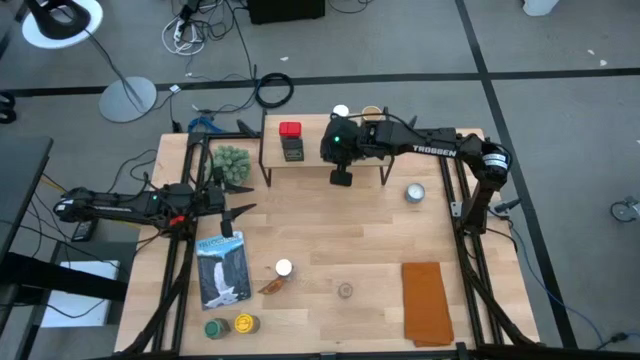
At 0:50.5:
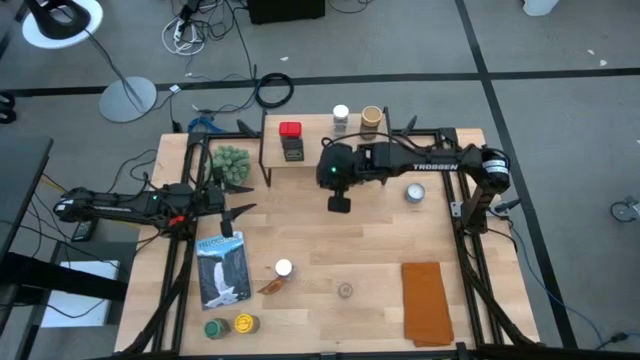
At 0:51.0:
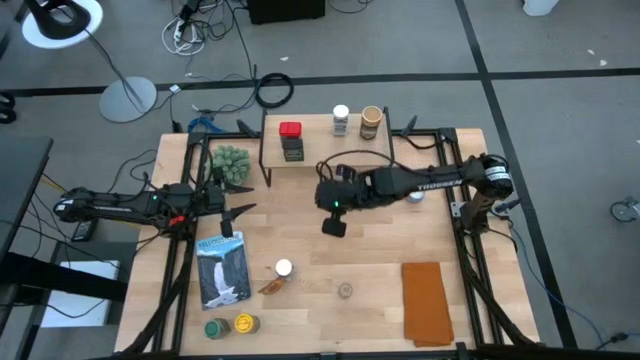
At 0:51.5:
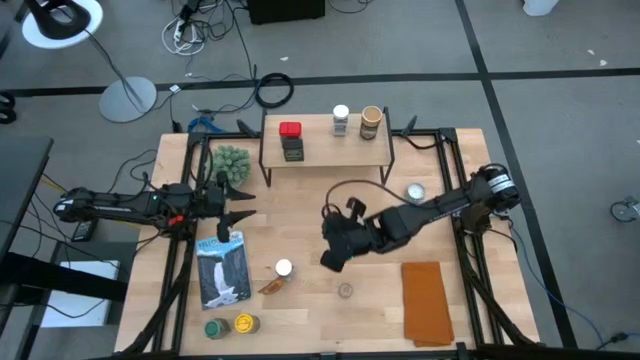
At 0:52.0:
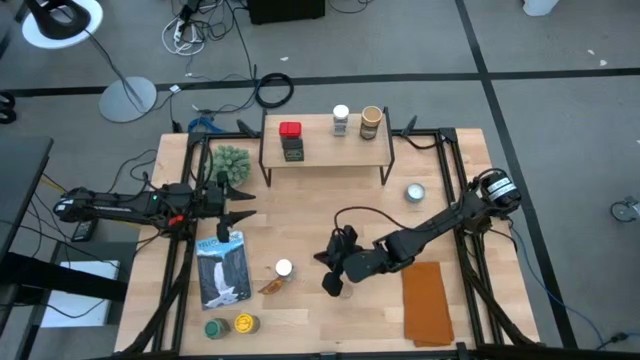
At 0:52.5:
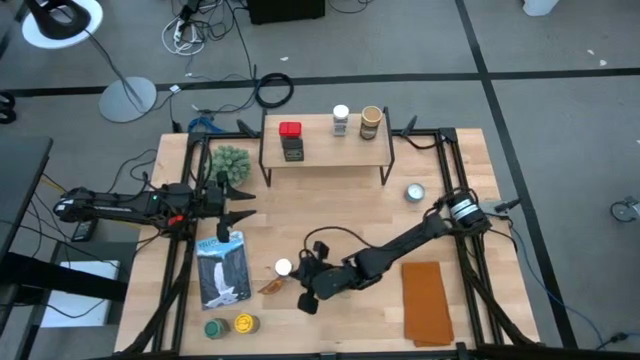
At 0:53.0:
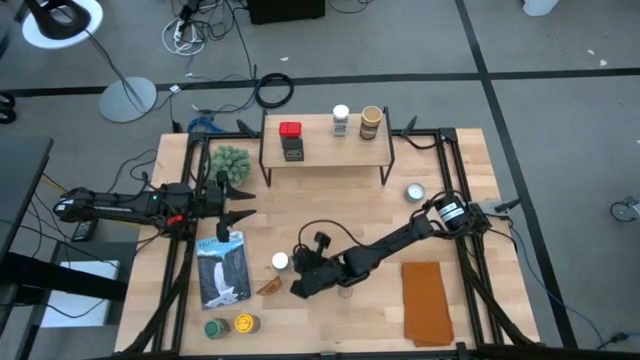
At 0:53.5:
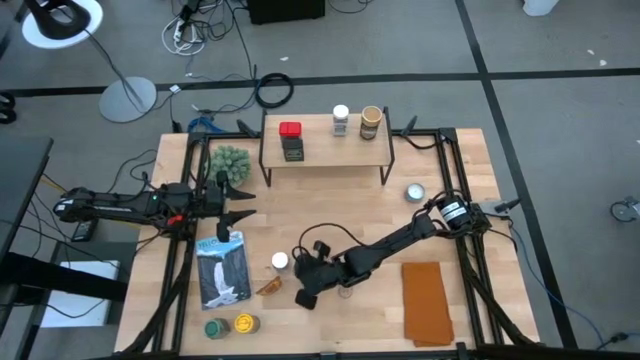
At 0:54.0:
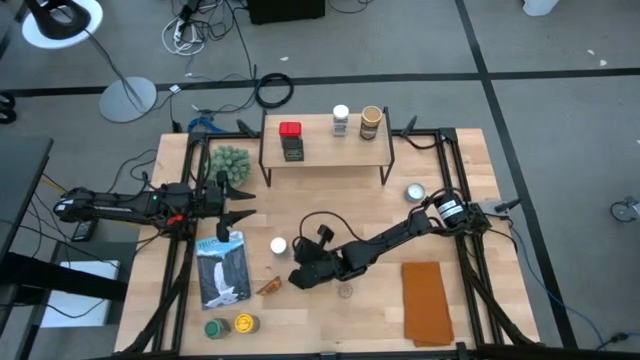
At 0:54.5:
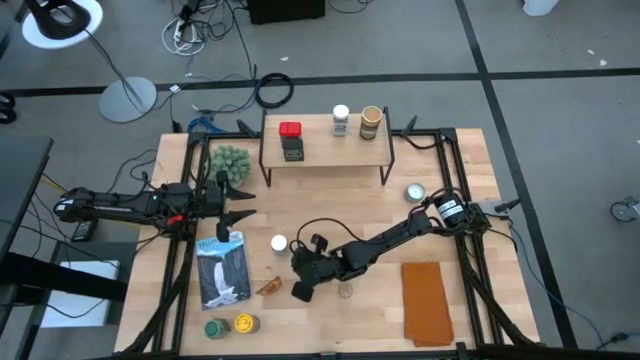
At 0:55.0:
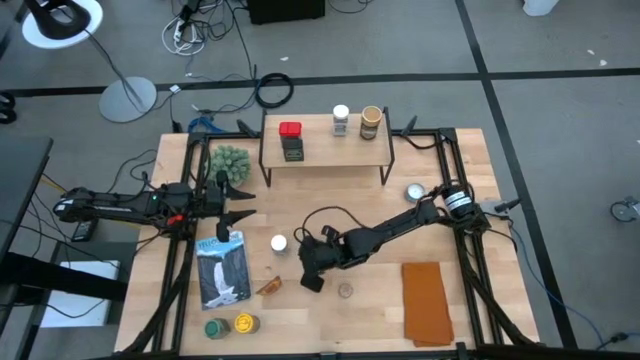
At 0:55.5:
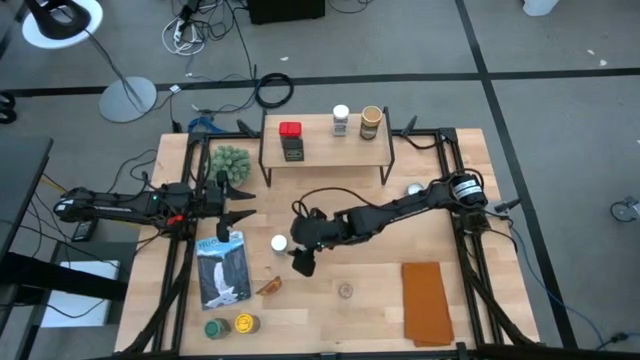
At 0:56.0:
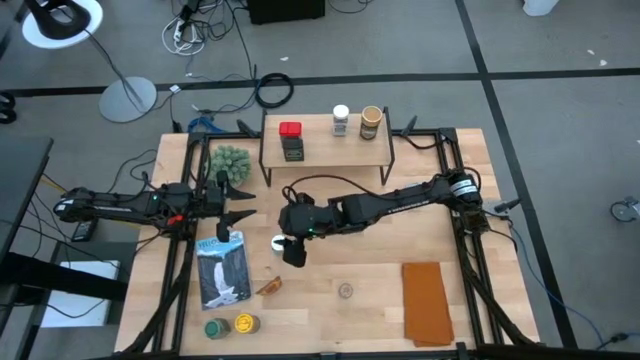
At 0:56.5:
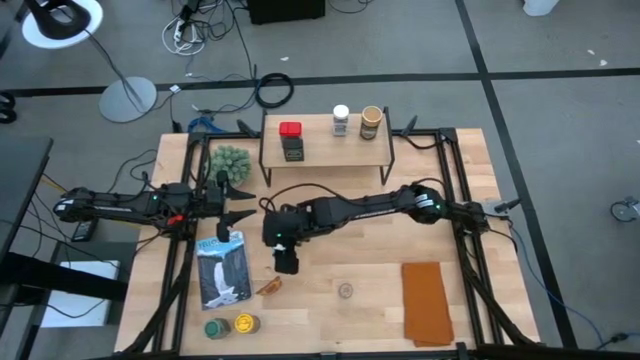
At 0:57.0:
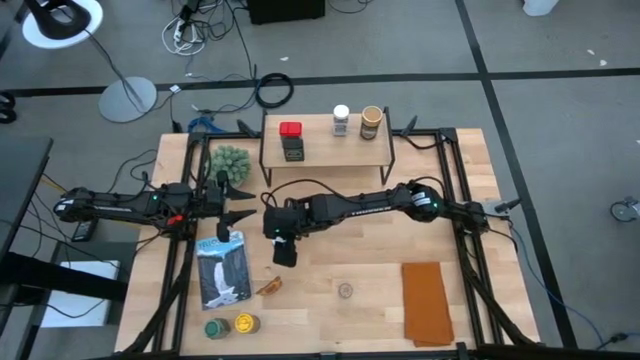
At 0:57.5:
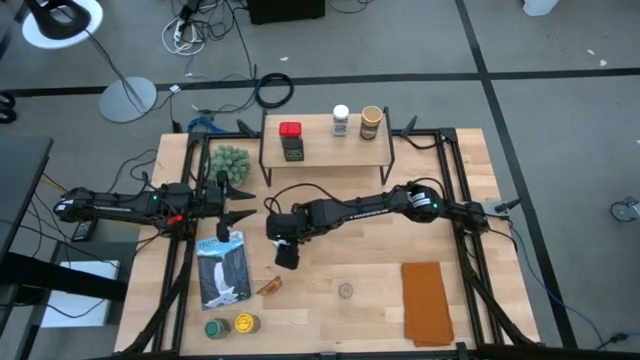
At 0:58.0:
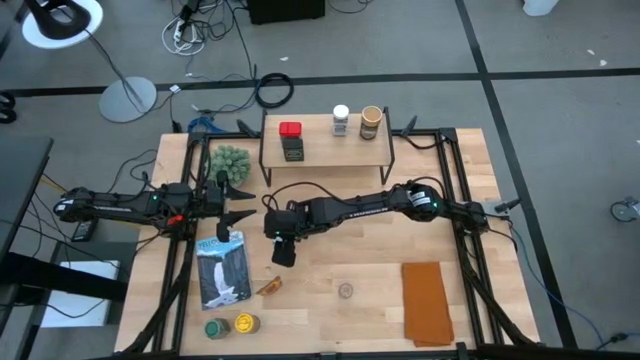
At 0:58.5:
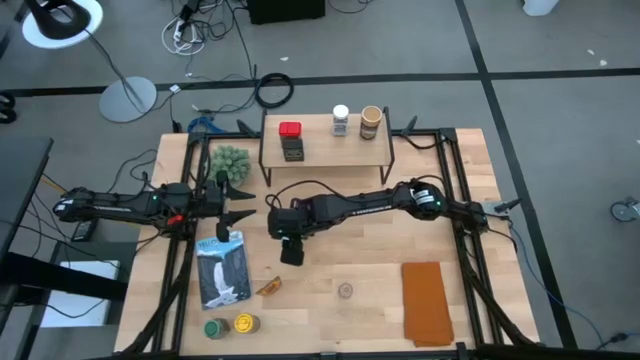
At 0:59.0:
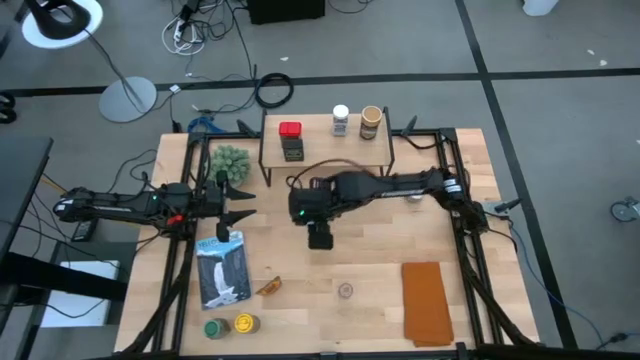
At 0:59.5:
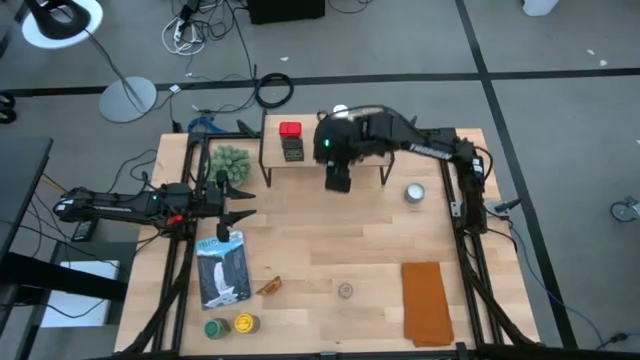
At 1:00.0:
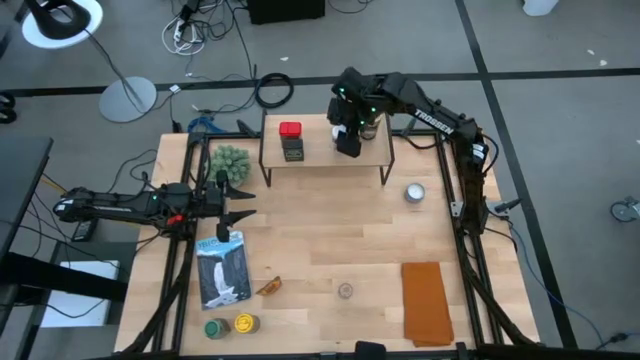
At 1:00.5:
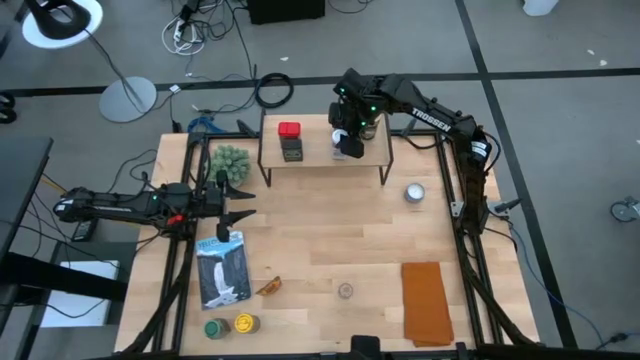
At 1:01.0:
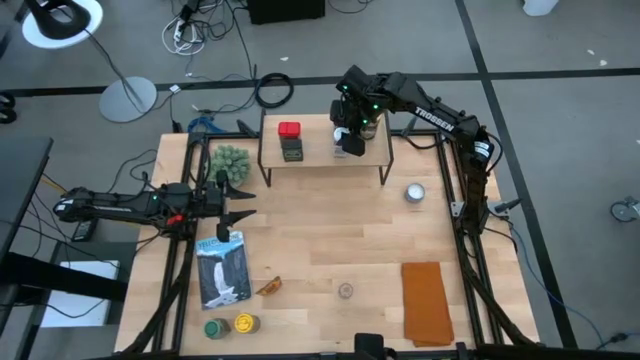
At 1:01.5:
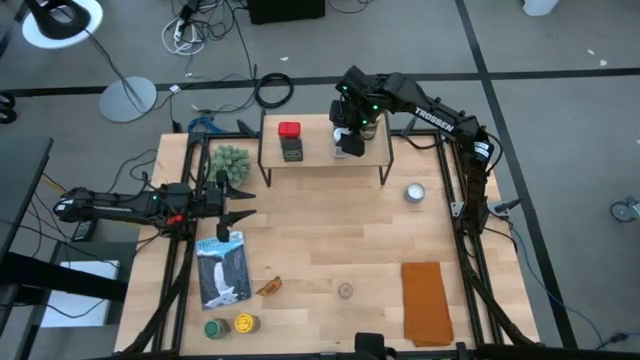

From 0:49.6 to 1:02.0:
Task: Shelf spices
Put the white seasoning bottle on the shelf

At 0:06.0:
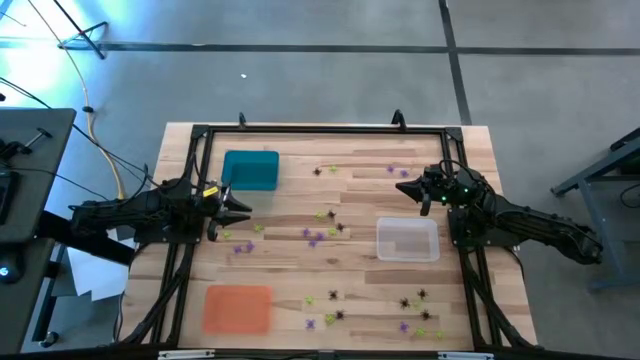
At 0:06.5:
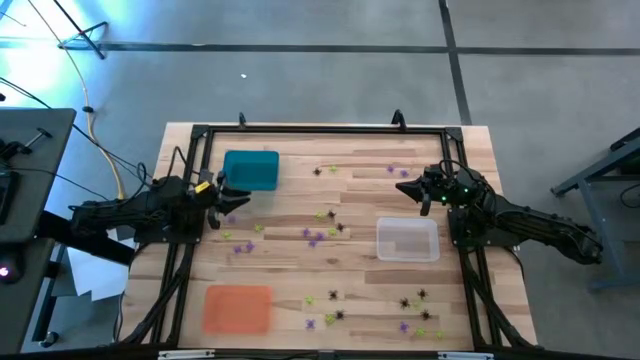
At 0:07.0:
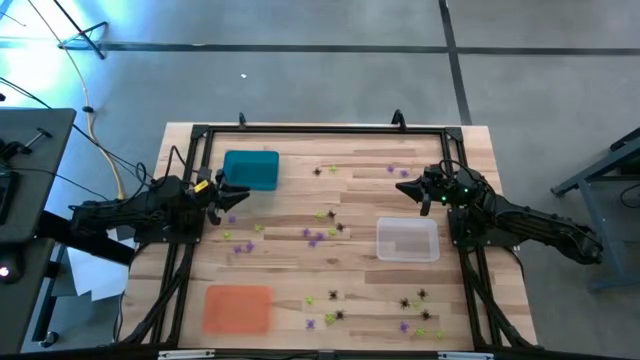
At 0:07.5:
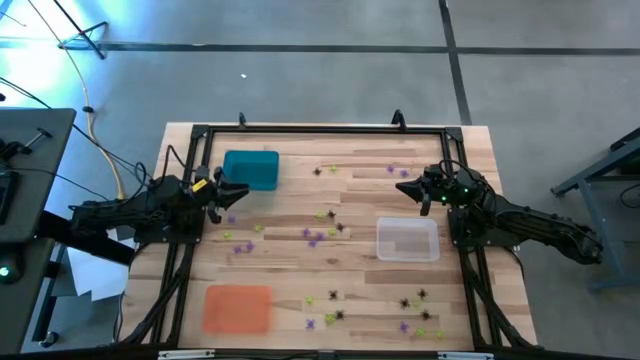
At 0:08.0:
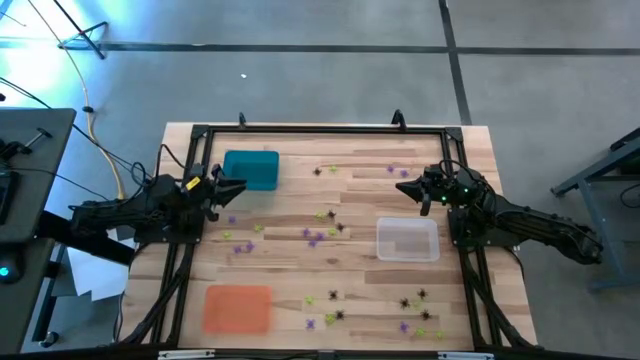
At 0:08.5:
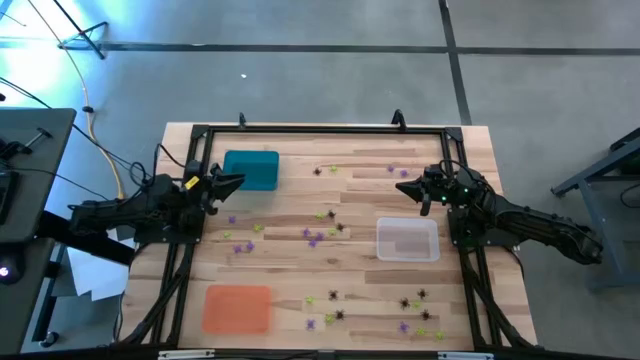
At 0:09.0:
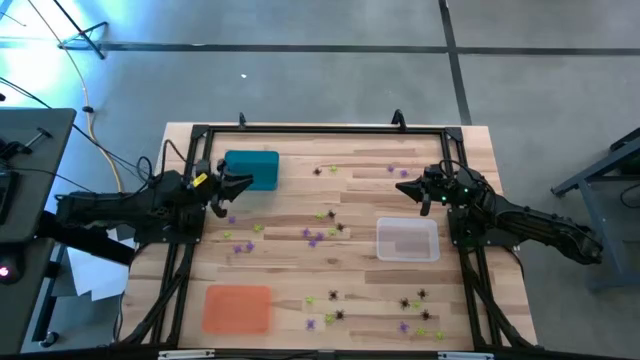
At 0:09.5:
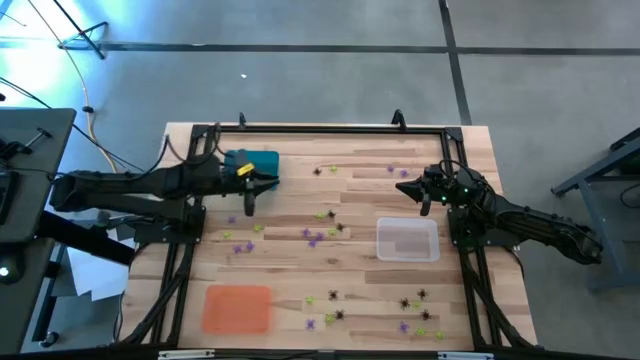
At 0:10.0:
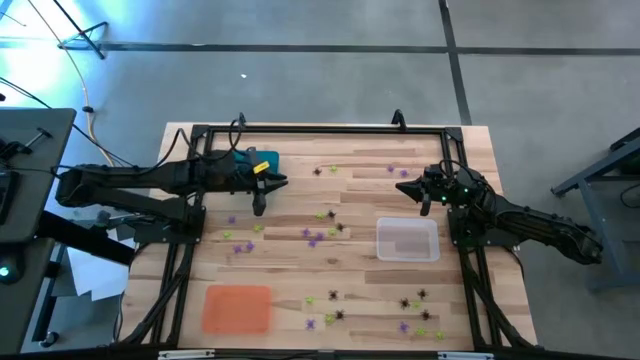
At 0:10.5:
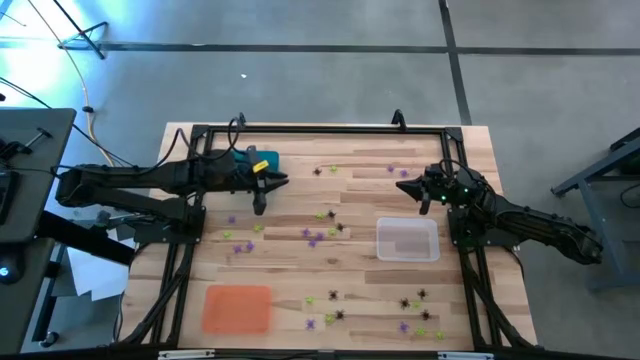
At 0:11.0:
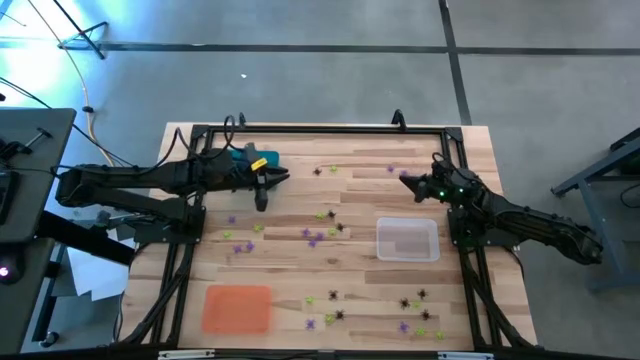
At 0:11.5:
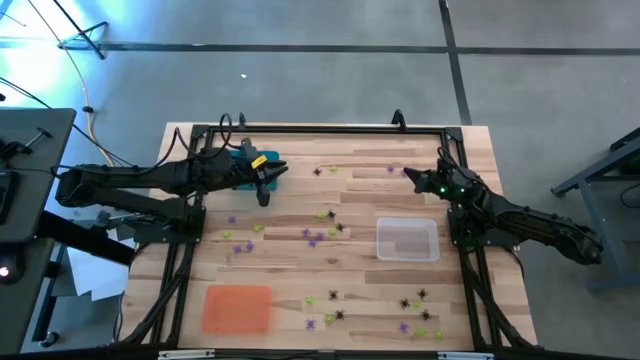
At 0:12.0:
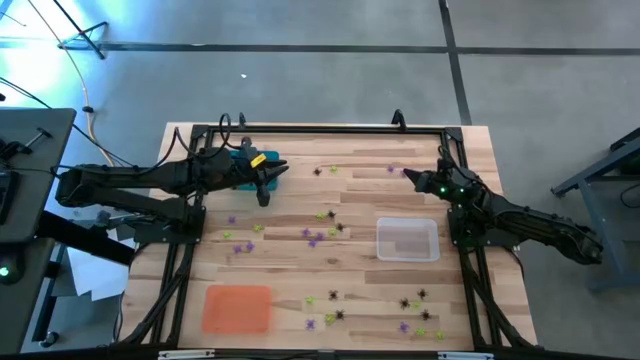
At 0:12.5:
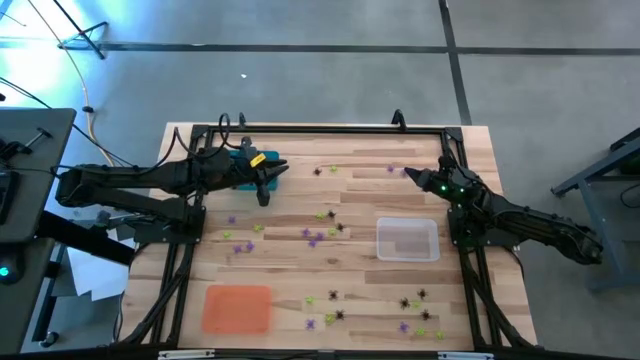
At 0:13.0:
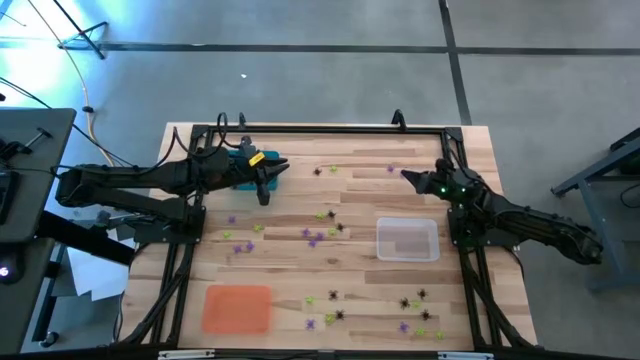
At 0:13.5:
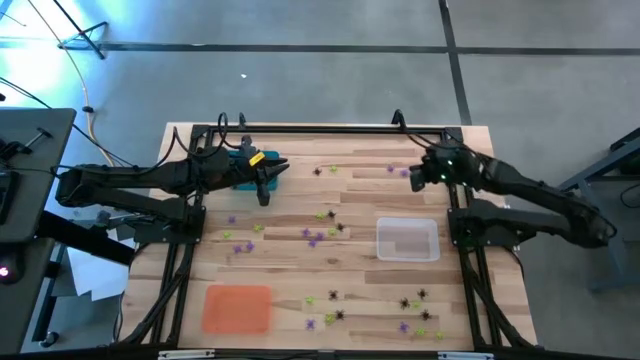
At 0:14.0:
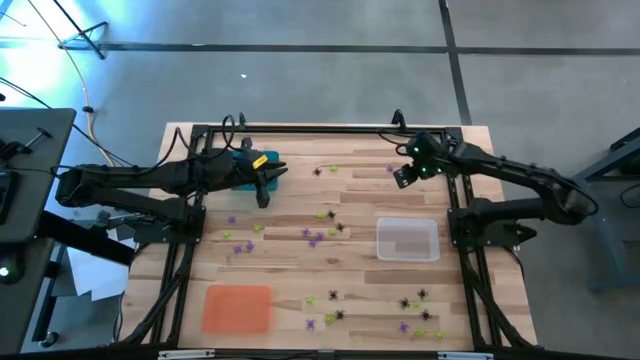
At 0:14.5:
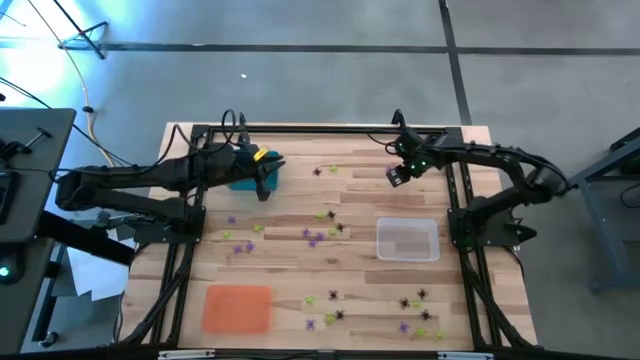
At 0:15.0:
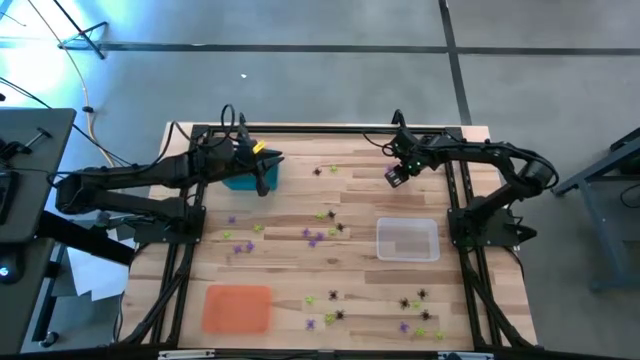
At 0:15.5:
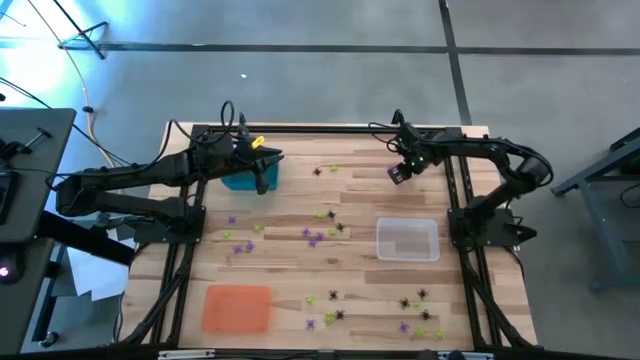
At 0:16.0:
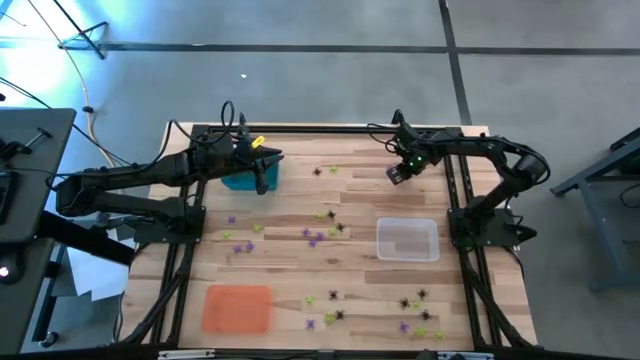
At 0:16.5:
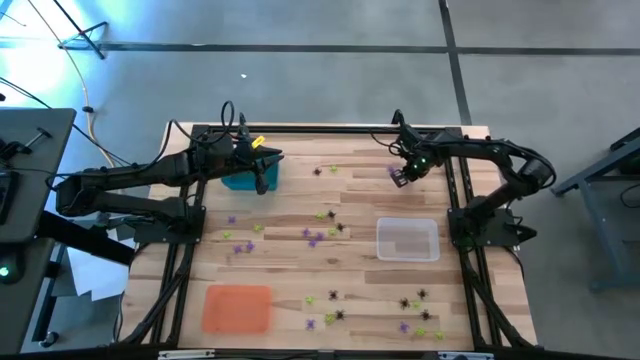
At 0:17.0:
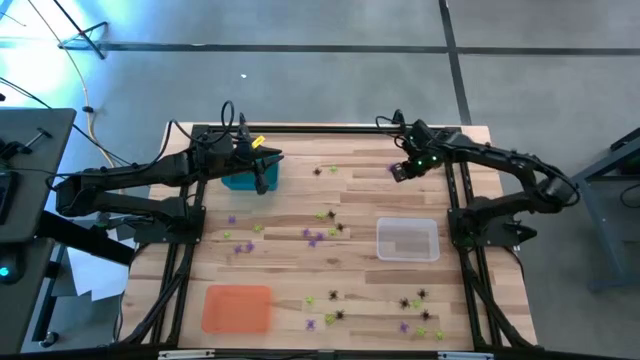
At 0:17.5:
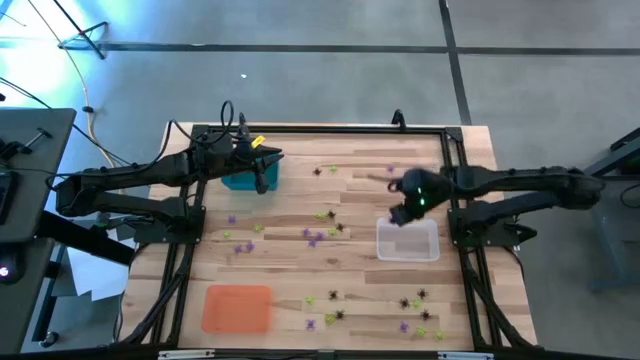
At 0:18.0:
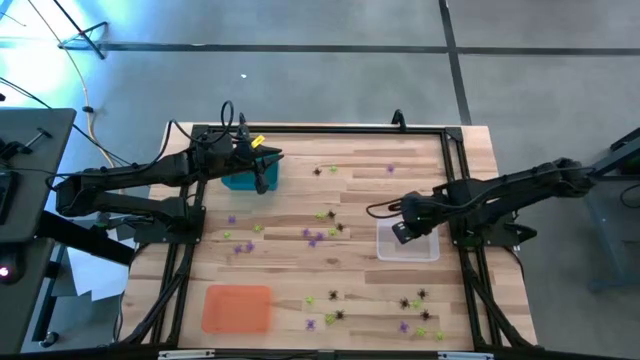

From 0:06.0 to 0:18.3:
Task: Sort Halloween decoration
Put the violet spider toy into the transparent bin
